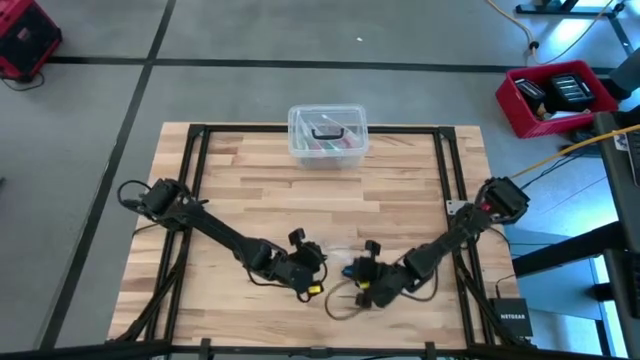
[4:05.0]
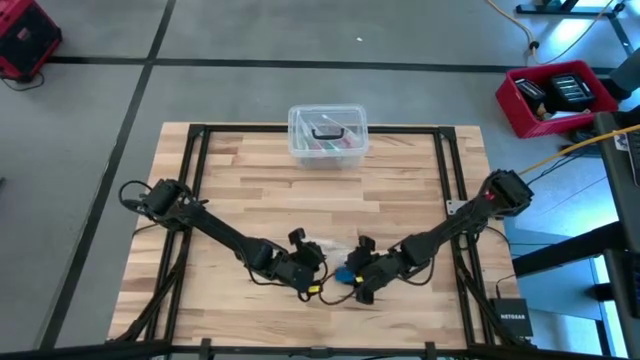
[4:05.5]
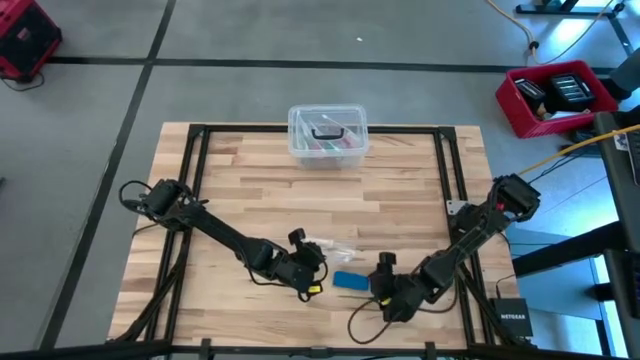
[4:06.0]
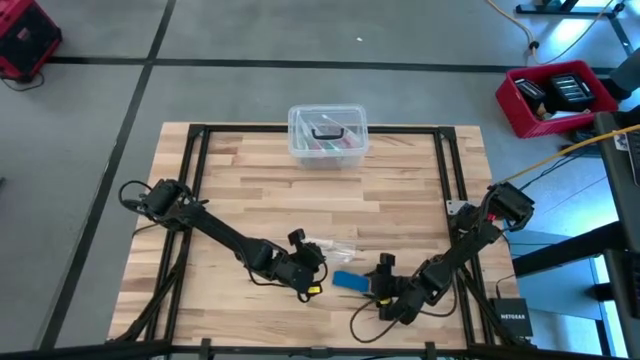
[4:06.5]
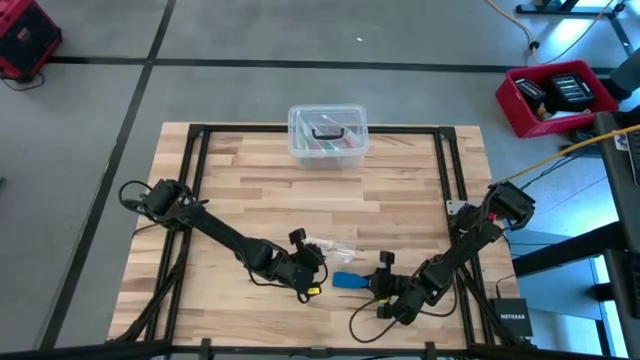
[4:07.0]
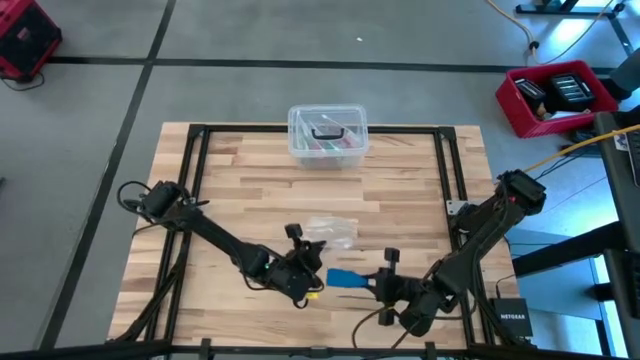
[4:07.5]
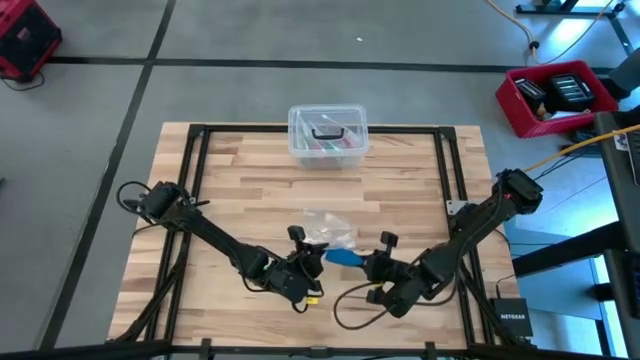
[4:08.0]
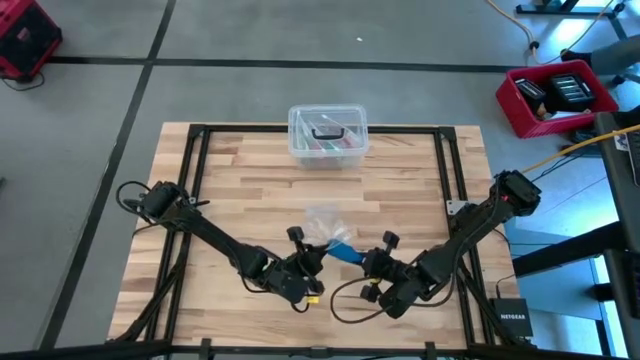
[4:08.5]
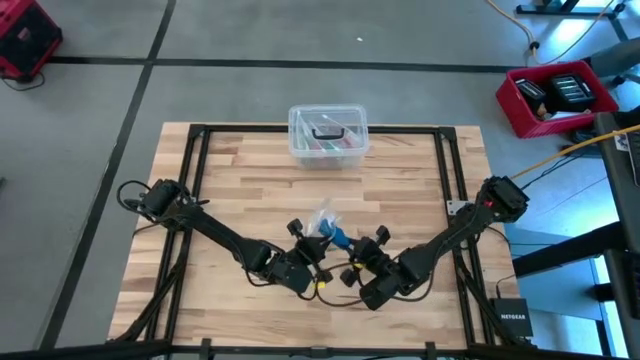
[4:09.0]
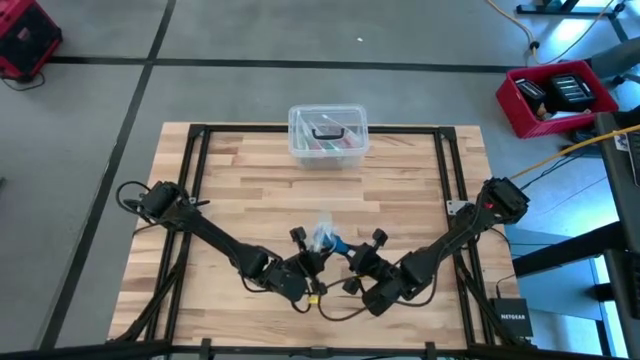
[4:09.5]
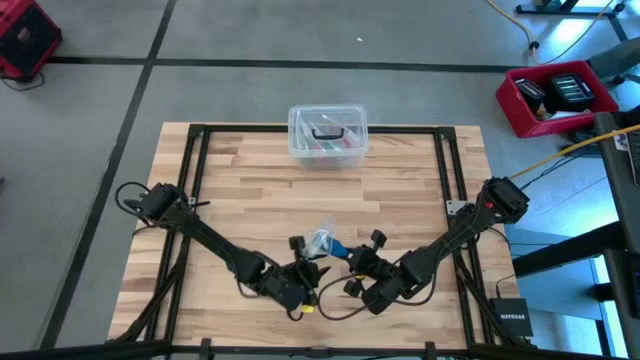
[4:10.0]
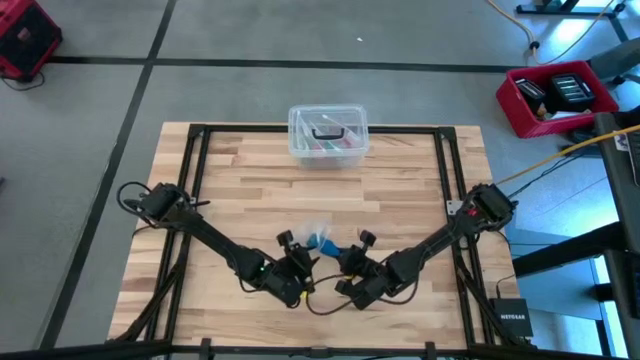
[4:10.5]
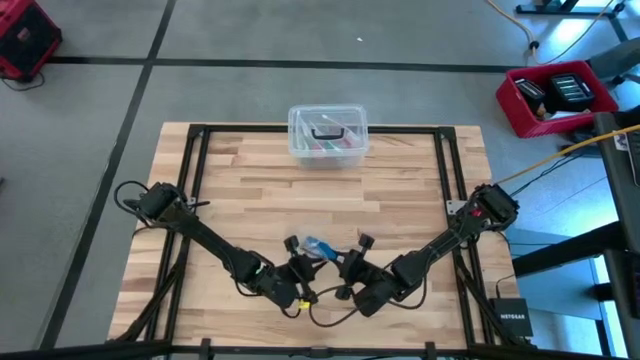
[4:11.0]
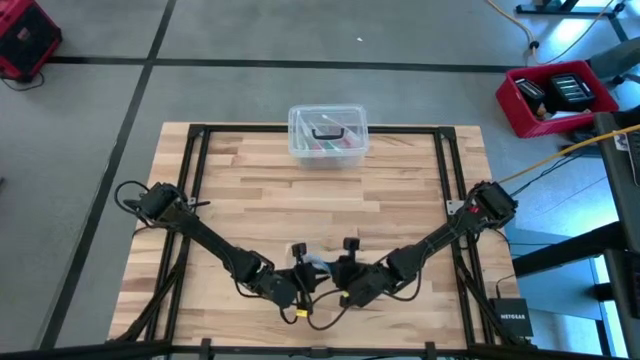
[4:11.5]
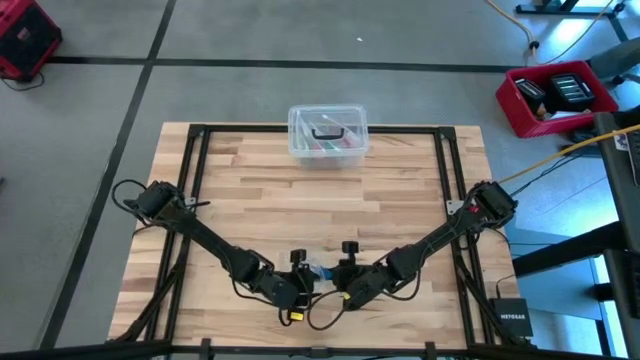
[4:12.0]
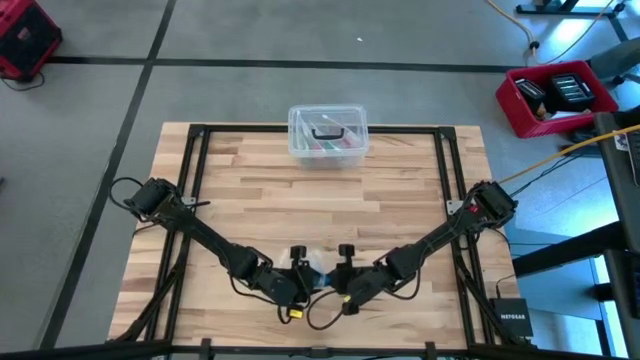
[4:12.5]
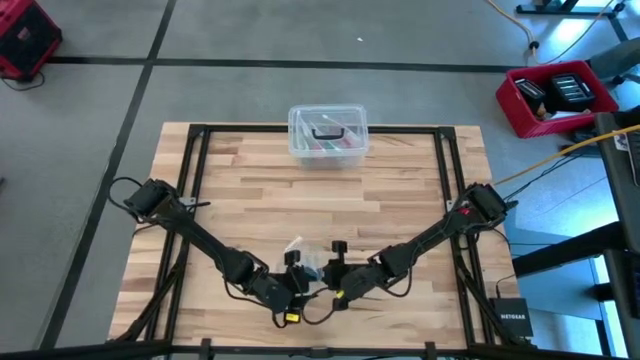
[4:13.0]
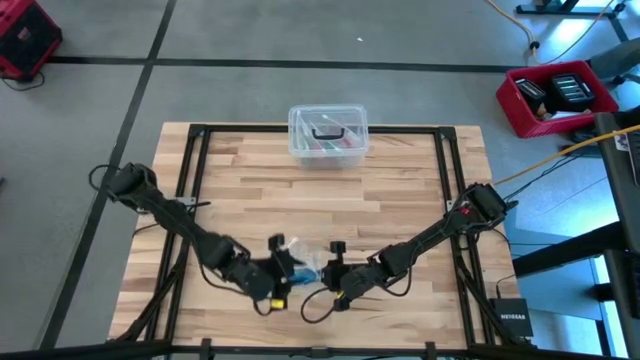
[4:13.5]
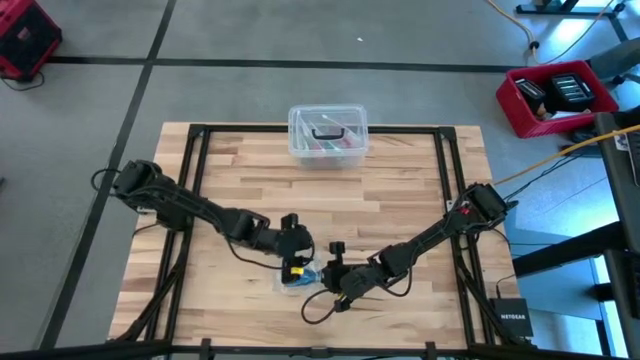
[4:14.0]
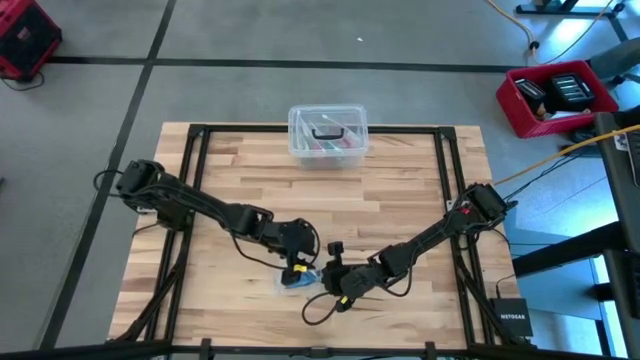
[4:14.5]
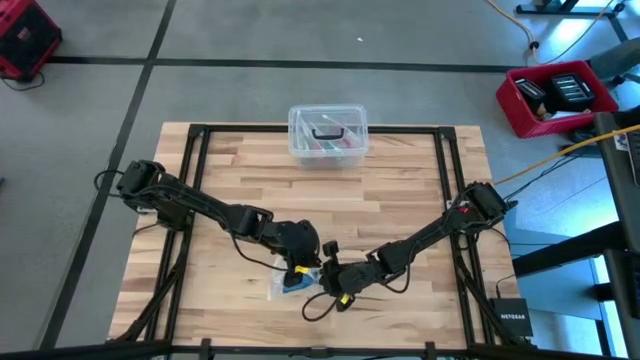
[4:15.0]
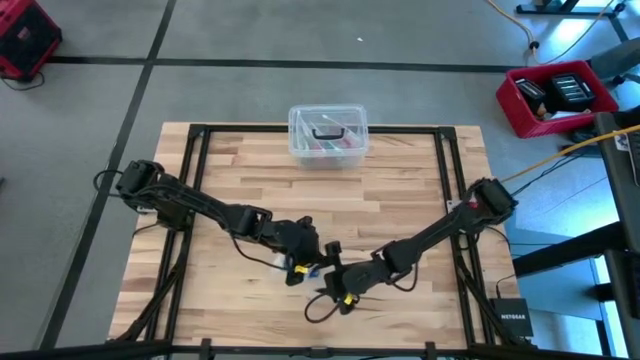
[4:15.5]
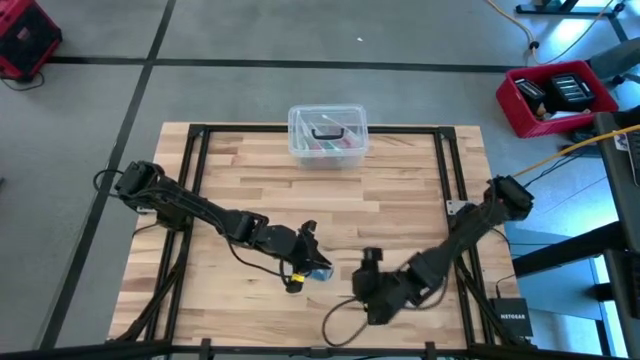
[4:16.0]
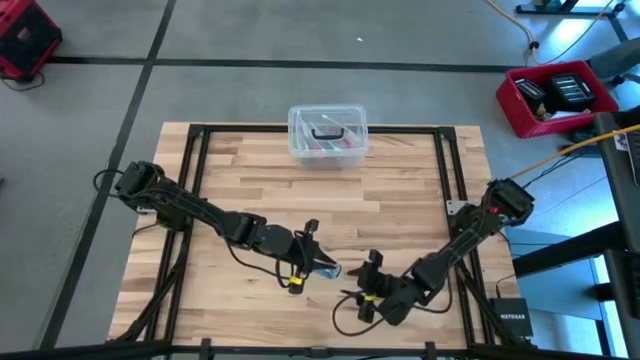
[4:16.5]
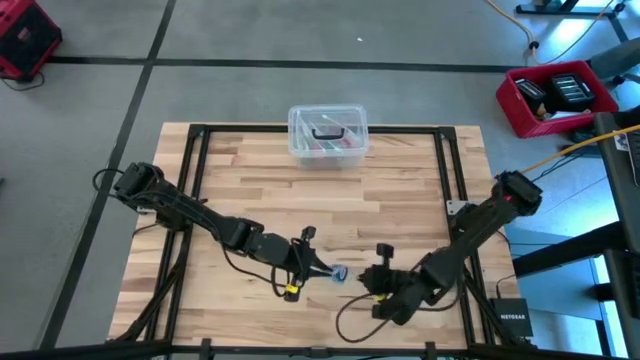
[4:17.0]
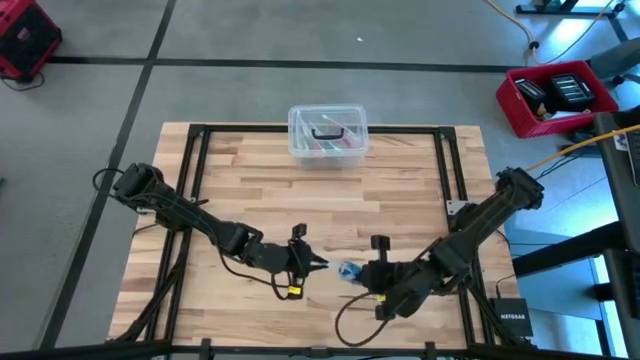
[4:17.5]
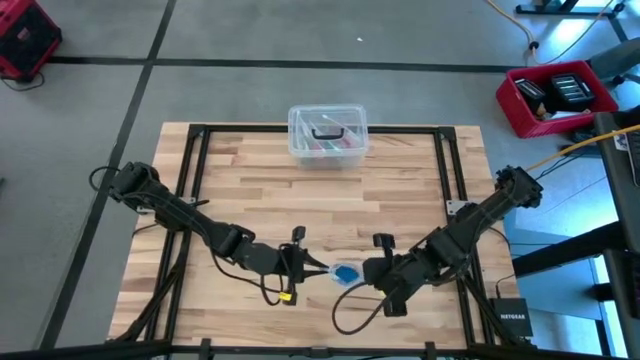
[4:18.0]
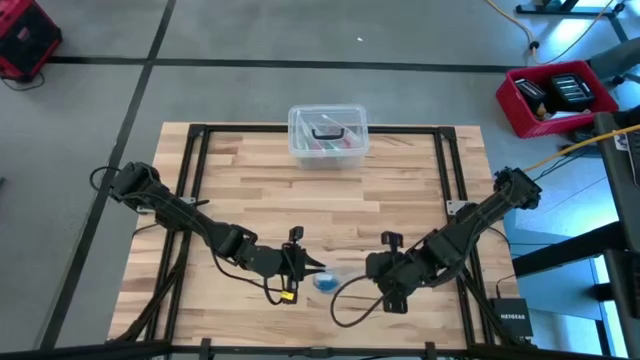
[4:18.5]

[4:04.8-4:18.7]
Task: Roll bandage
Put the rolled blue bandage into the transparent zip bag

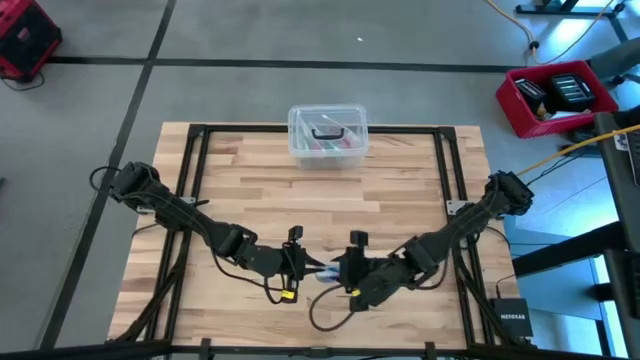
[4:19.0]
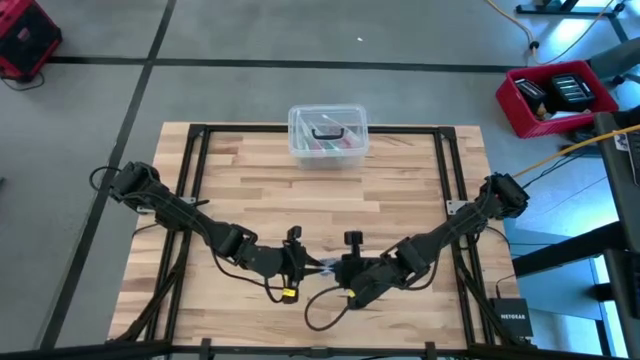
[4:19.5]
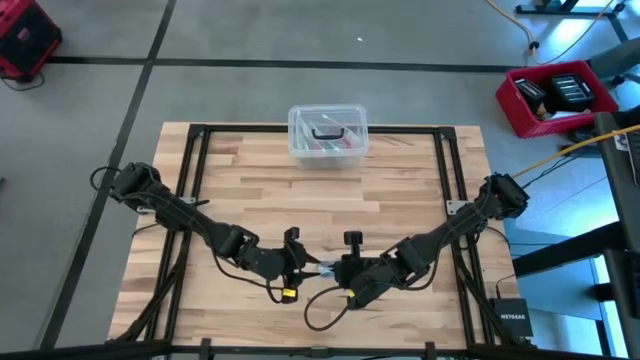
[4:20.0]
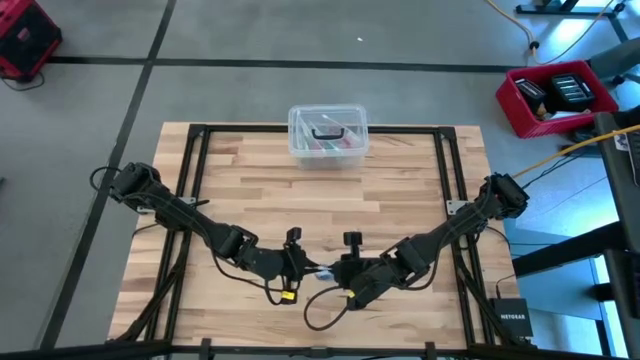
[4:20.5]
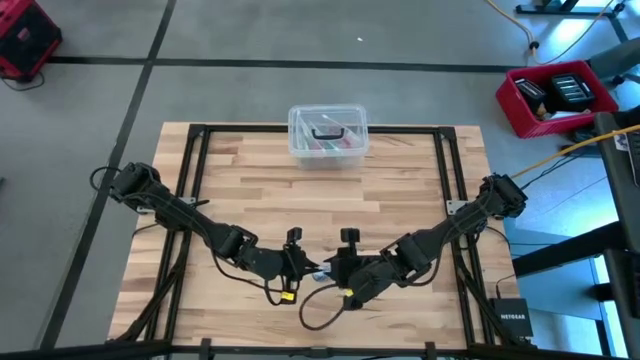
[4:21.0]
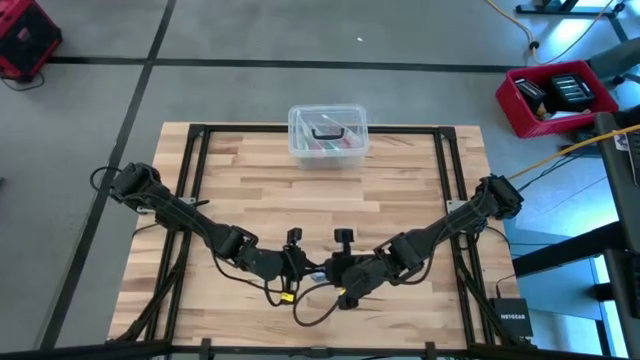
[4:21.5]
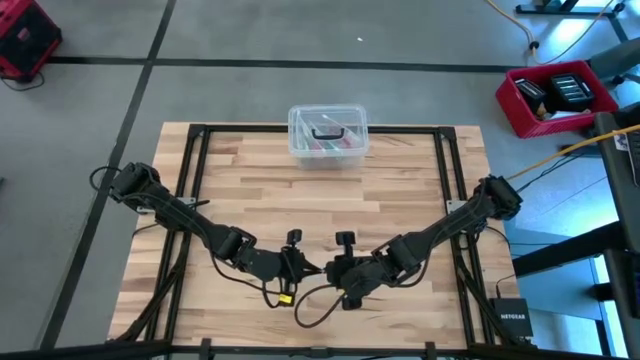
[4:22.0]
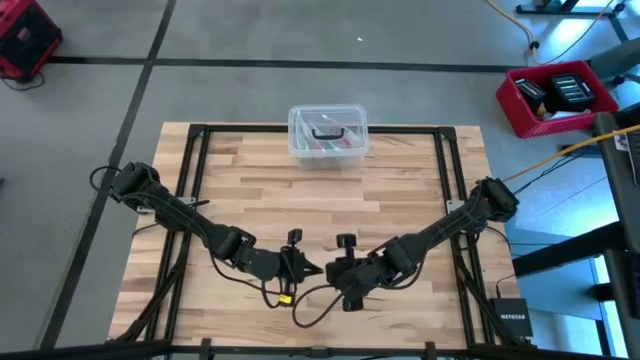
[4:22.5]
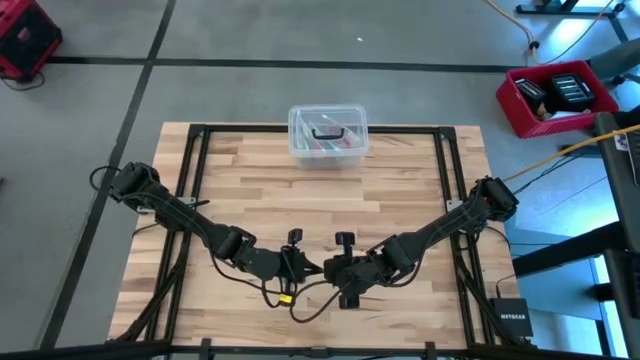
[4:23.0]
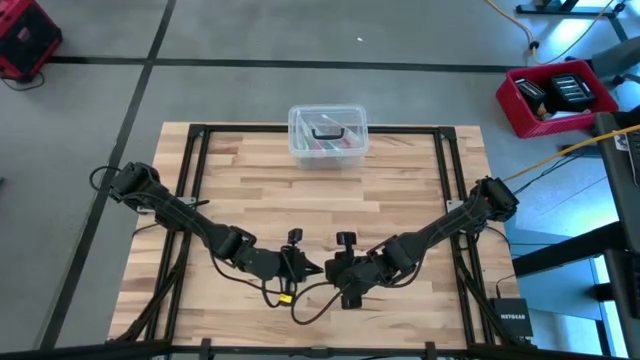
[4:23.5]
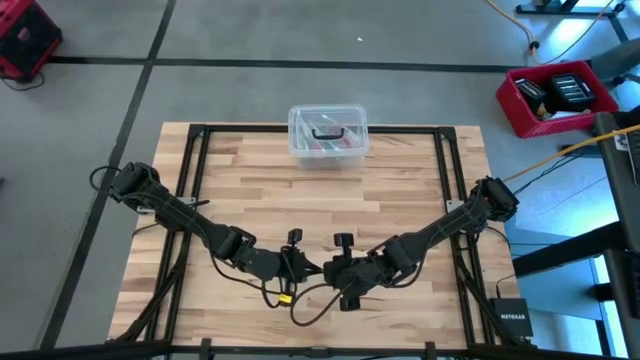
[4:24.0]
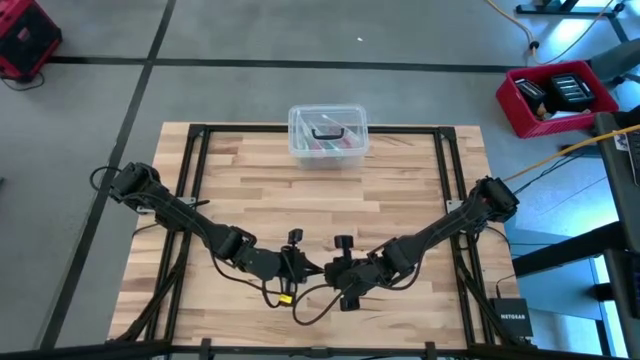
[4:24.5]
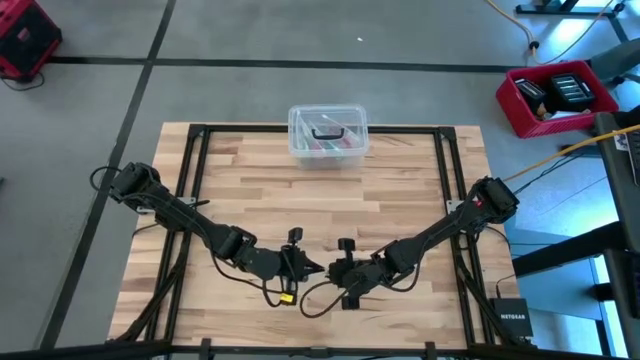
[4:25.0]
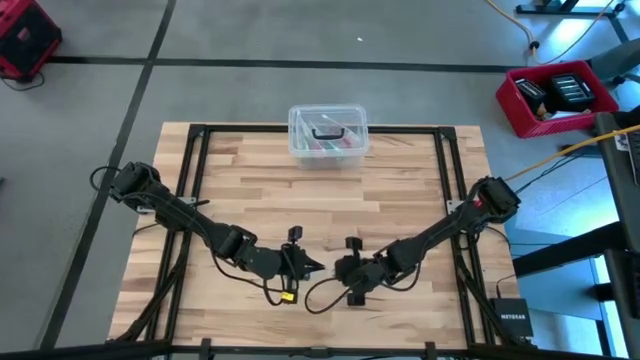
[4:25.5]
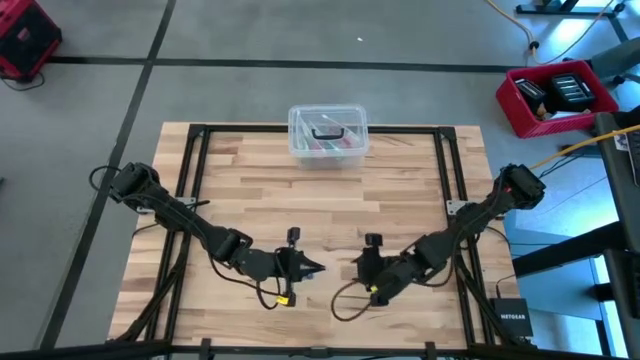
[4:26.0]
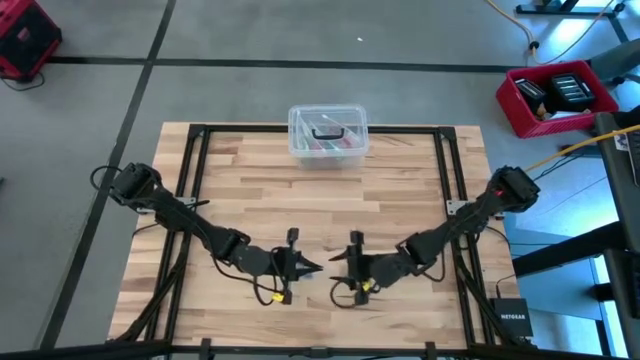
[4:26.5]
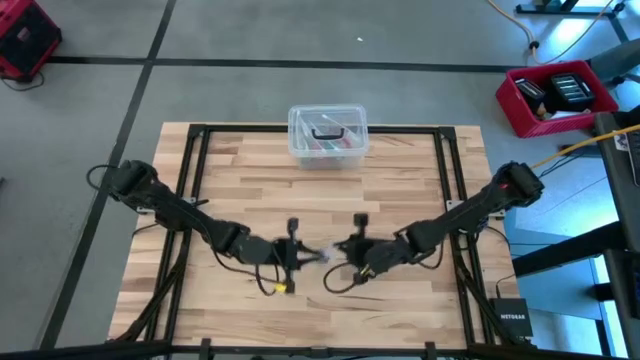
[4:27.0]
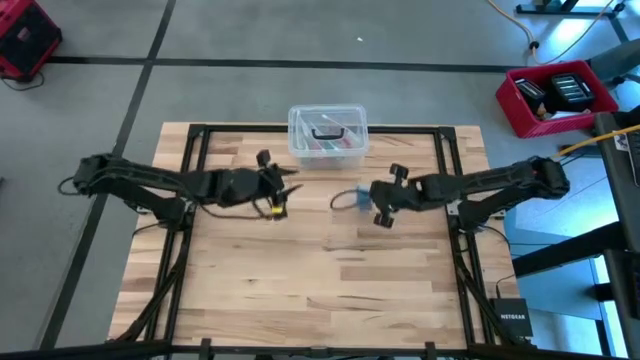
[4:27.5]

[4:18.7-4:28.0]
Close the transparent zip bag
